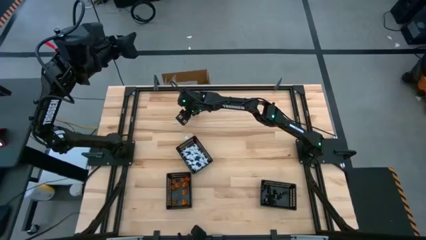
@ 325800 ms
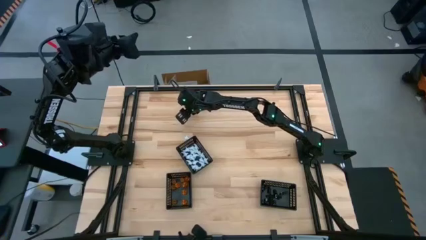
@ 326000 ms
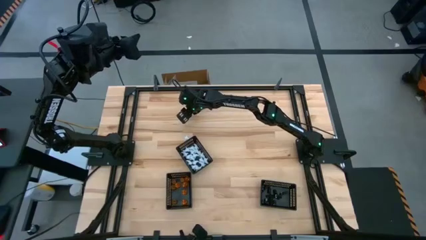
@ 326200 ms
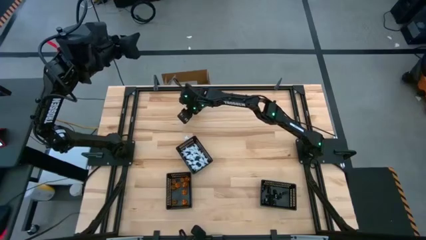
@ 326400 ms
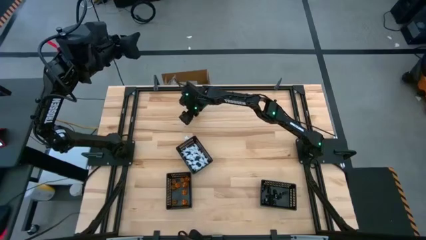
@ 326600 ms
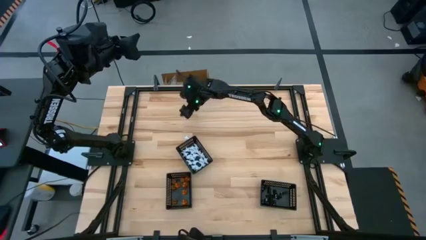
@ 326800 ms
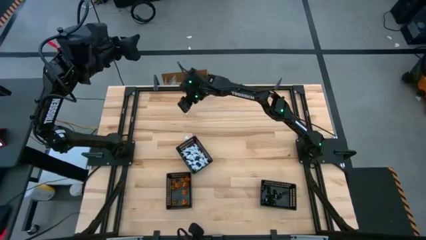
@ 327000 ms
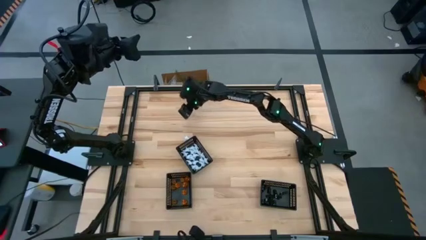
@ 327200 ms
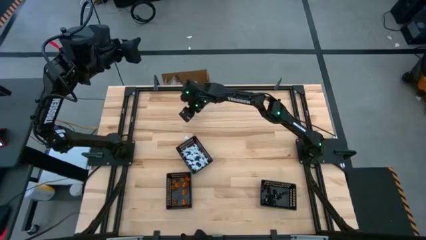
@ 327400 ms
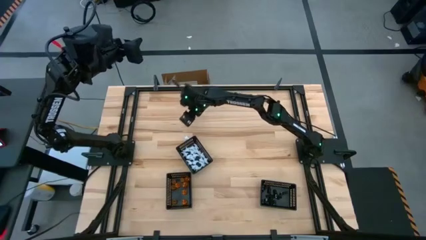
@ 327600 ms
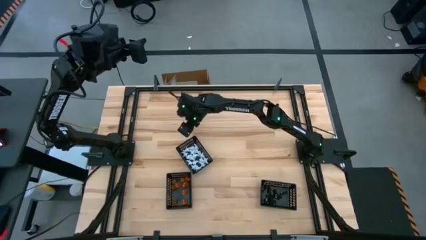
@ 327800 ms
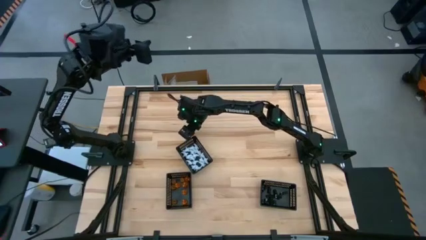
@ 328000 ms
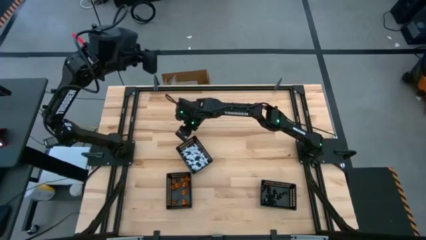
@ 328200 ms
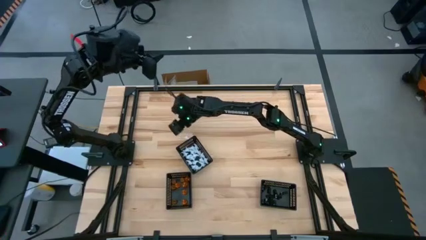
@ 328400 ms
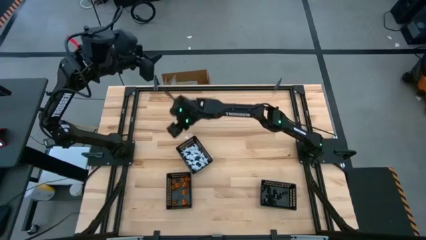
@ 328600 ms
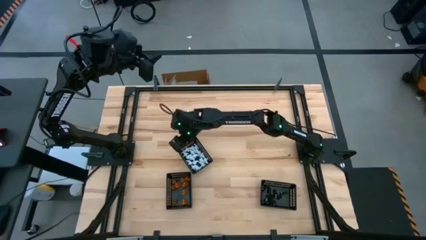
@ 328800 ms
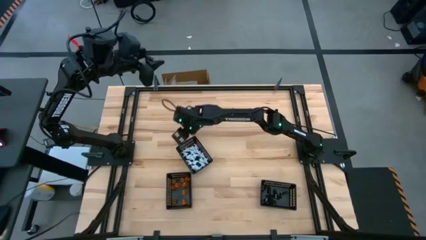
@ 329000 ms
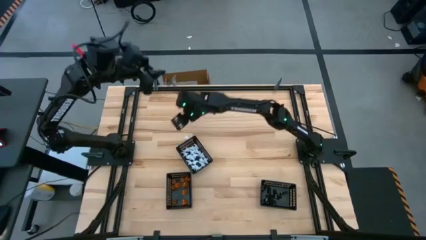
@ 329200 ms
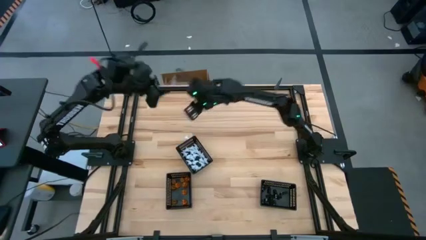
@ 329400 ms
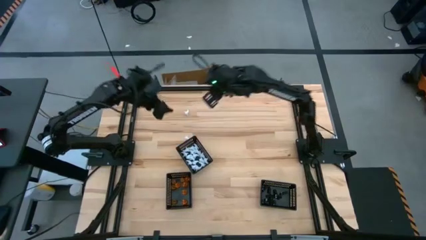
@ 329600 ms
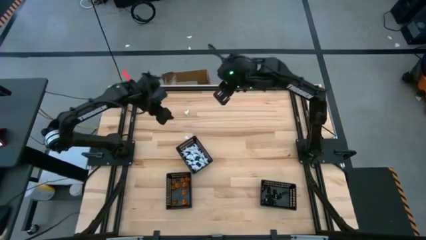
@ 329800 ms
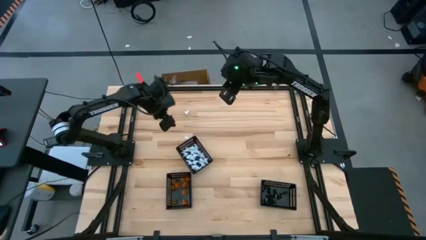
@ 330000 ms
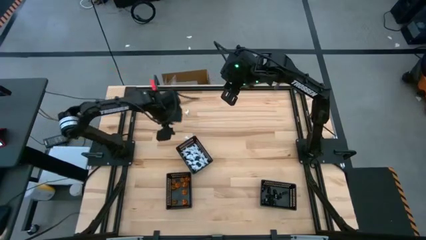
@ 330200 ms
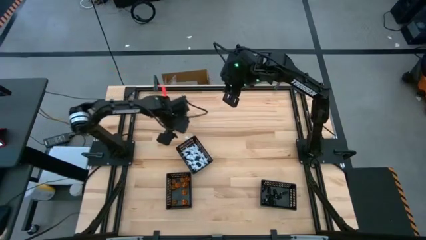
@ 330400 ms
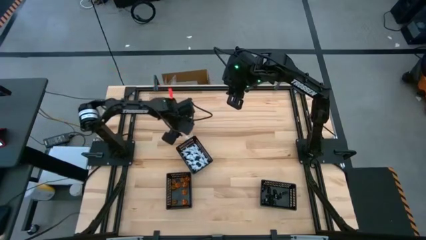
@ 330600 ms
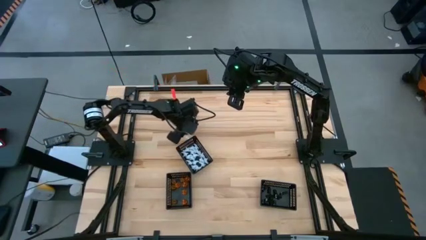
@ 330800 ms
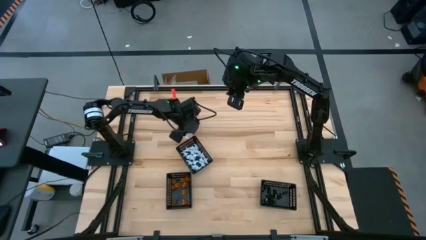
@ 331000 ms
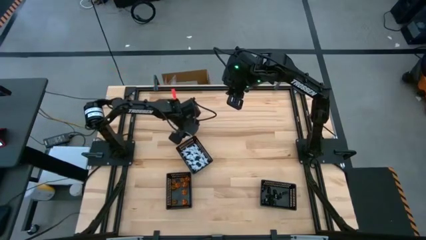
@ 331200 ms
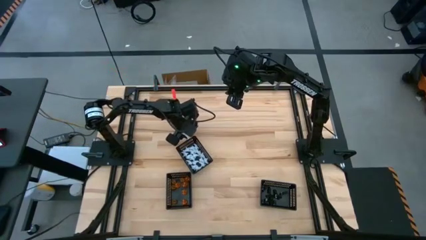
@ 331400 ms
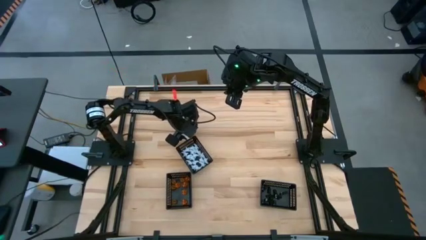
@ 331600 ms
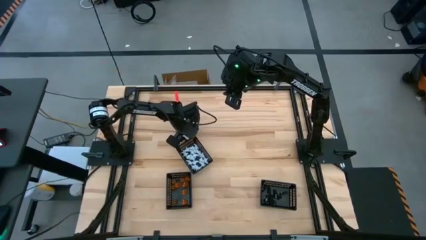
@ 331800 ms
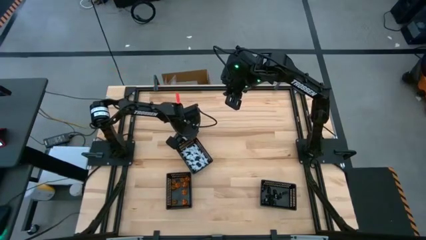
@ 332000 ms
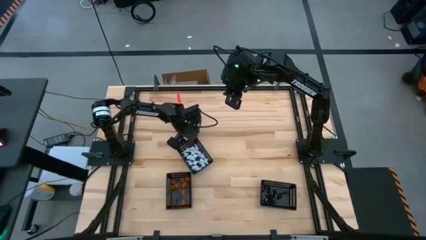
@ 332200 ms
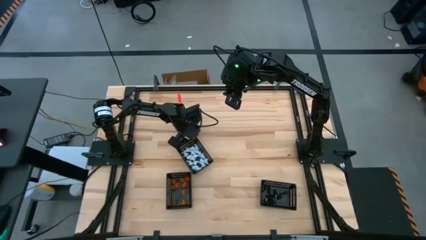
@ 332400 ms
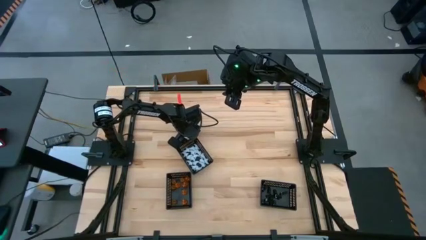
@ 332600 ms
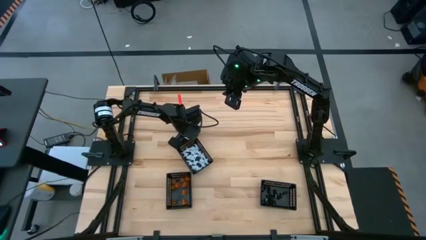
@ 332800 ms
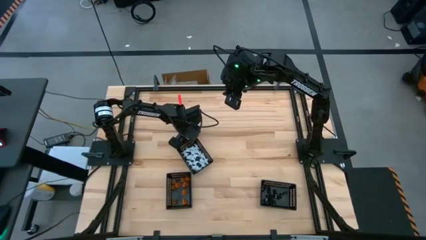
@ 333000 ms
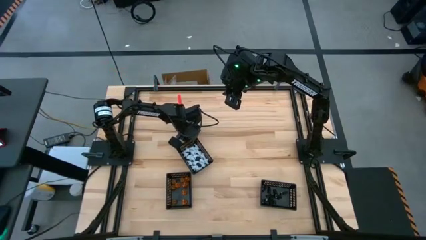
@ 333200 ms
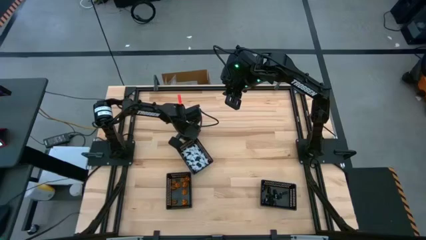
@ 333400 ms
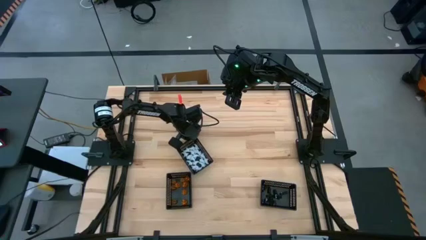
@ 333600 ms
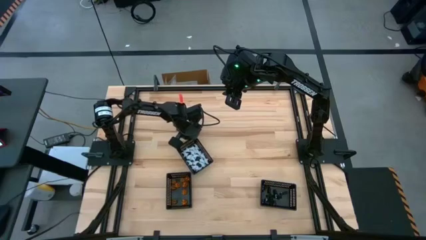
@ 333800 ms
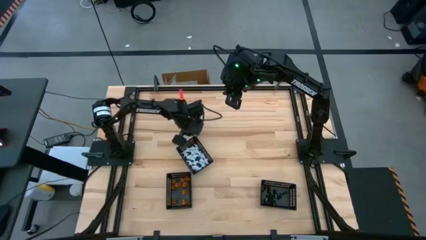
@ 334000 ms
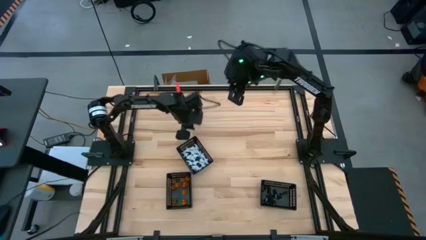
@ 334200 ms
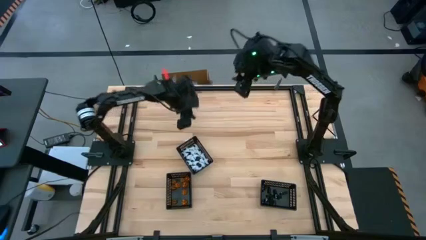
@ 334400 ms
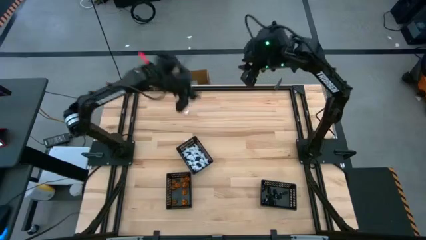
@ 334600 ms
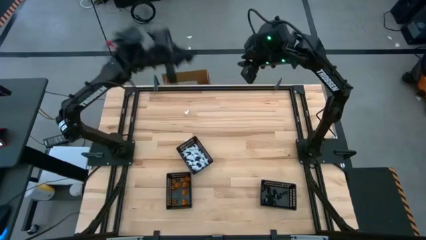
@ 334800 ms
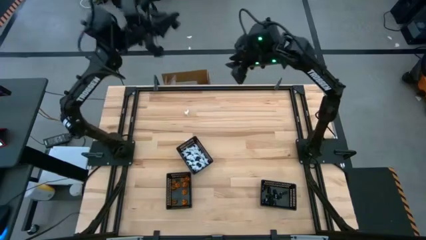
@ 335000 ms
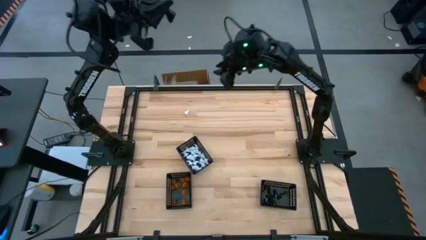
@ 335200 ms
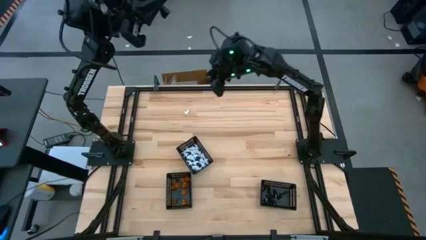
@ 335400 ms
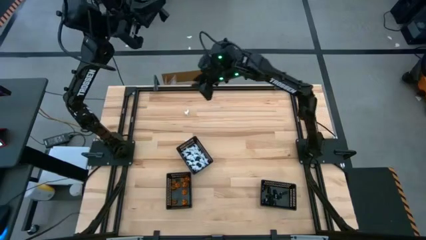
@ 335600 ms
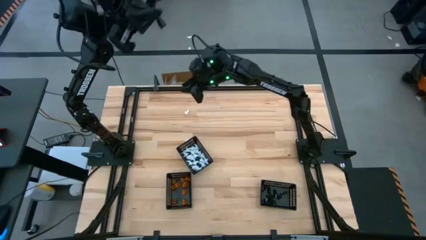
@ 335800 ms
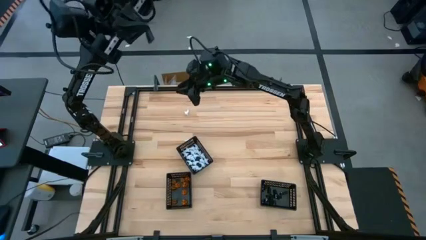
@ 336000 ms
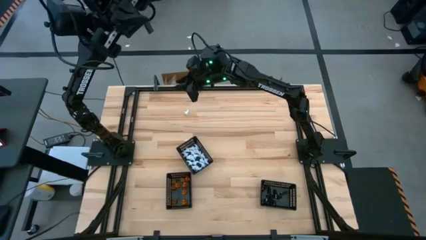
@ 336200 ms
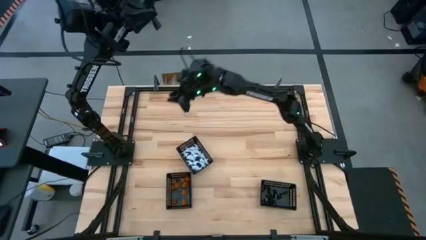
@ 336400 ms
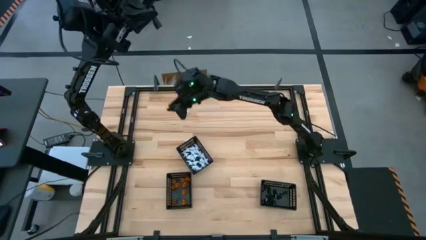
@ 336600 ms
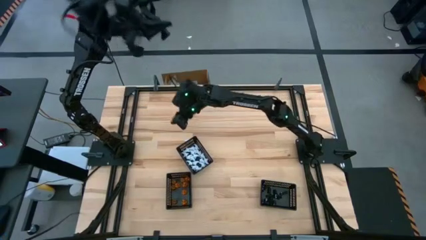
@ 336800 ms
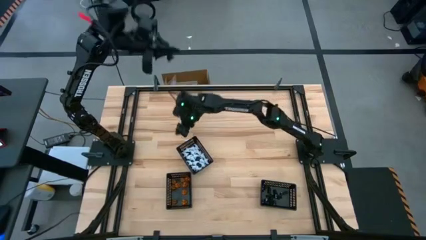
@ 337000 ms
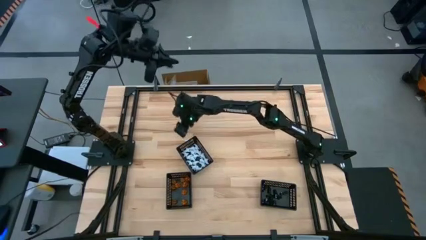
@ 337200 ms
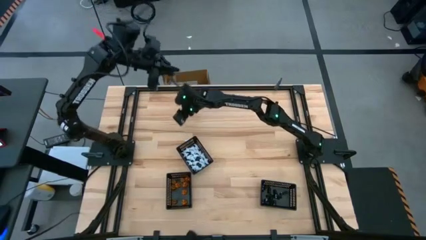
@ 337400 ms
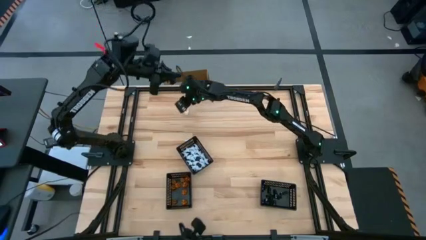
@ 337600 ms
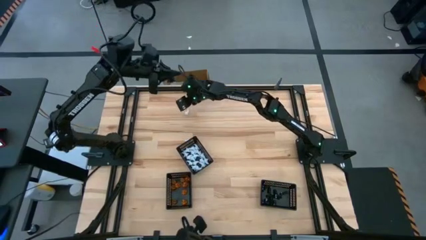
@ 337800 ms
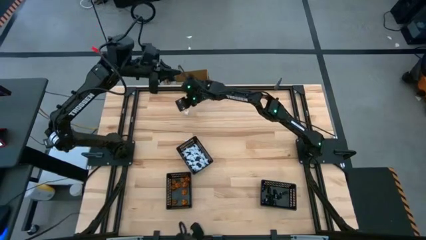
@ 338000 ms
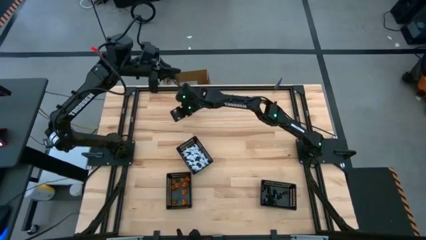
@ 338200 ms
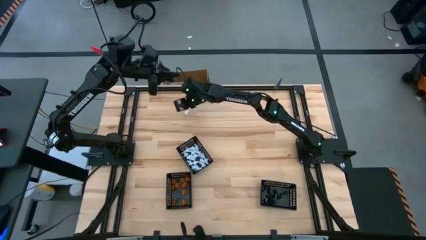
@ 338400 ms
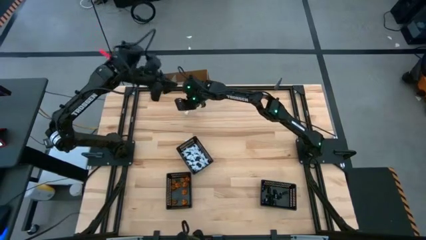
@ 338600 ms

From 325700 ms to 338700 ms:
Task: Sort Halloween decoration
Put the white ghost toy into the middle black basket

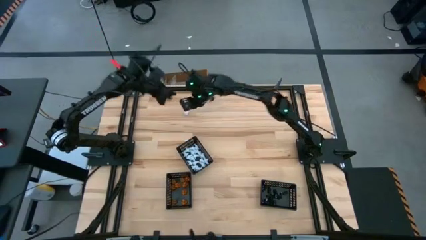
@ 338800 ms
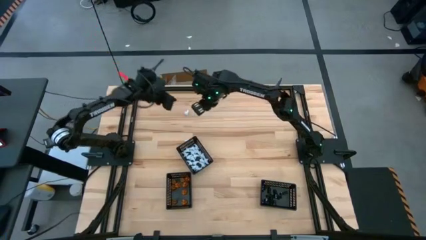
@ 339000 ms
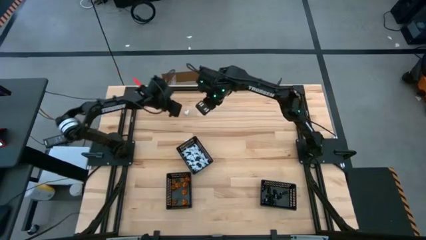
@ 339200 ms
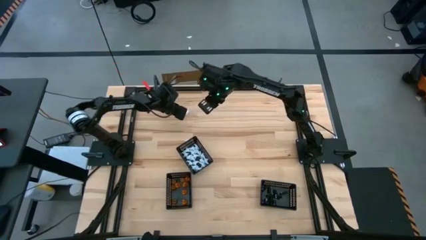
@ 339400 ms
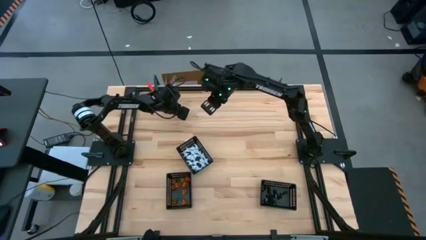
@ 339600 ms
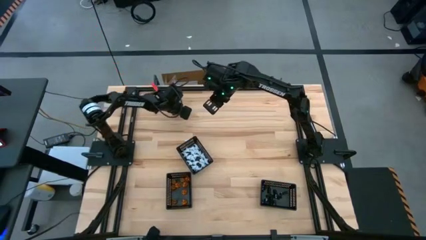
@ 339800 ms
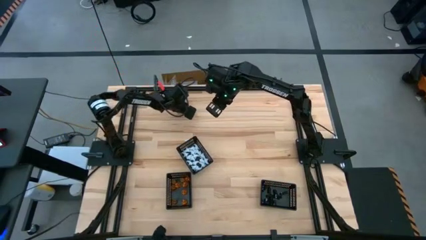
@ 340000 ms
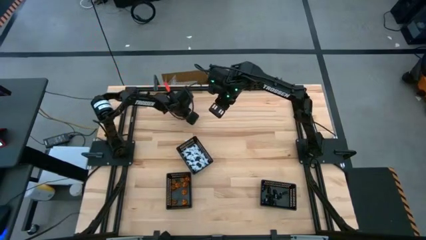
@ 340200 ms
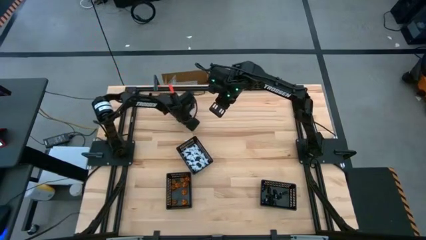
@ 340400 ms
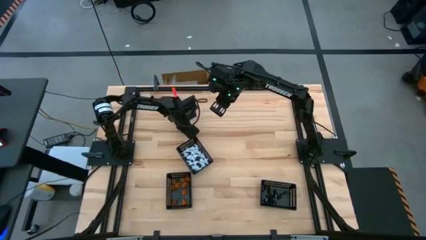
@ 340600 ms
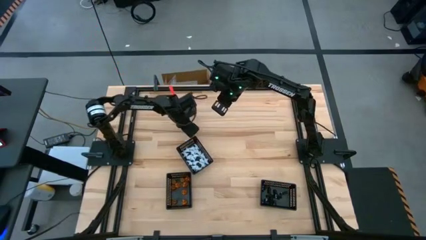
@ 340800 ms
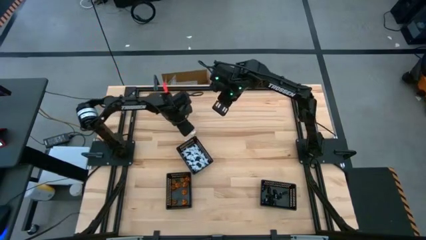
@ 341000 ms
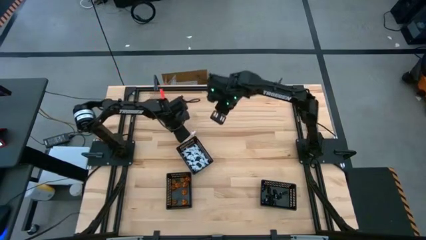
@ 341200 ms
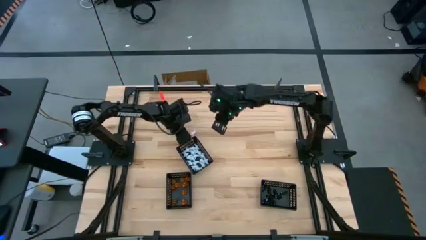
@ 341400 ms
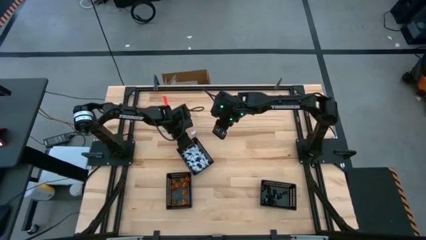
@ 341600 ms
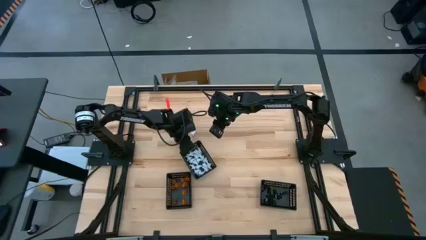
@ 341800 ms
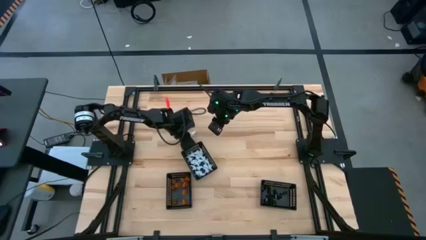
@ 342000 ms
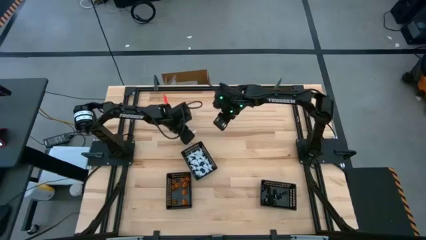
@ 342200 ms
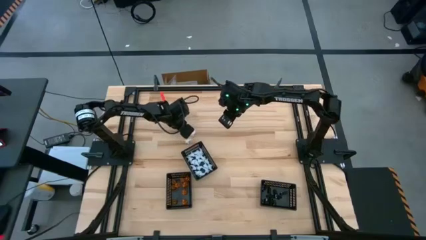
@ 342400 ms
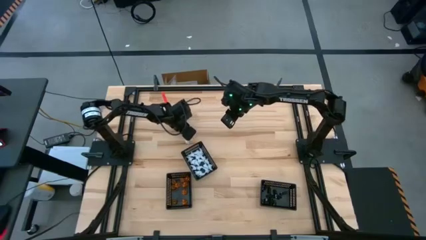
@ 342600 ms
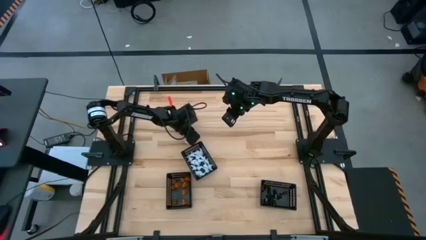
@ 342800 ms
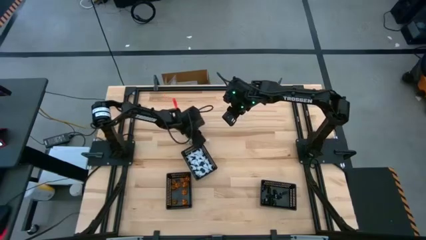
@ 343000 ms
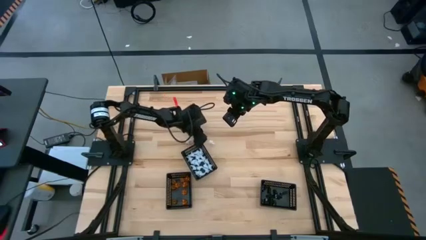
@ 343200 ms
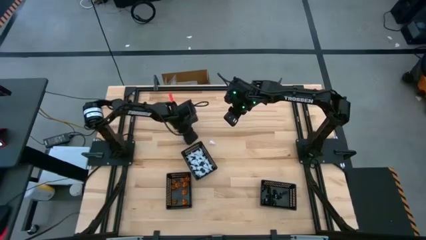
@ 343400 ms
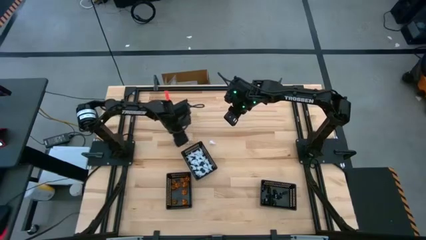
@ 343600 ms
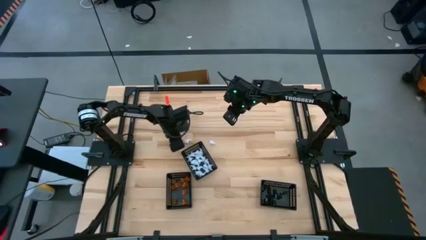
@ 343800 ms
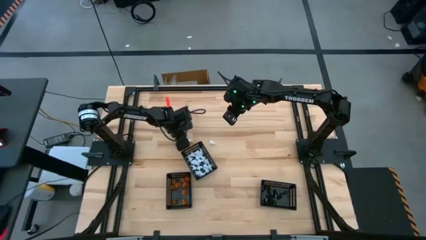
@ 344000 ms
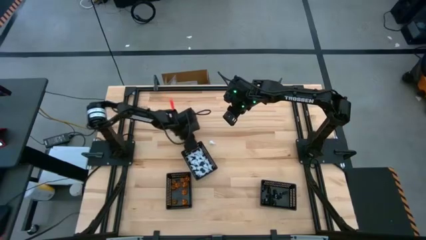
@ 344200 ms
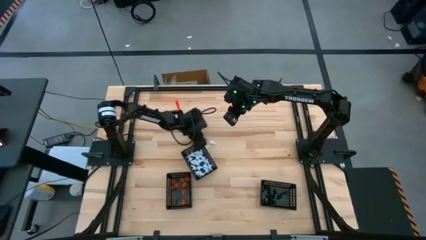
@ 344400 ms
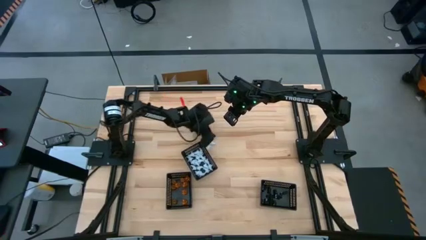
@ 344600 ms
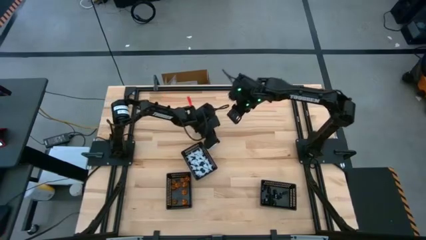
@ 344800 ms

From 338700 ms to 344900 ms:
Move the white ghost toys to the center of the table
